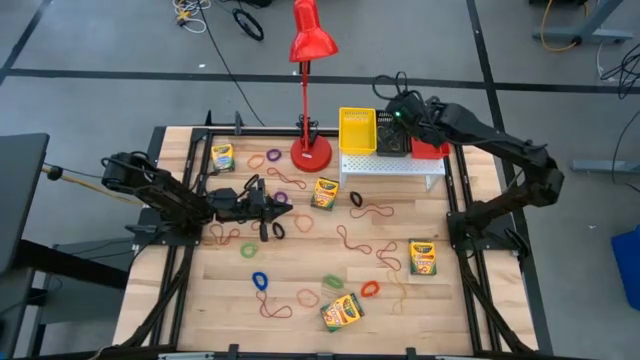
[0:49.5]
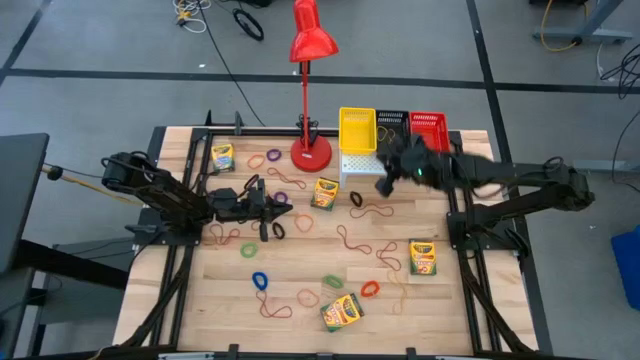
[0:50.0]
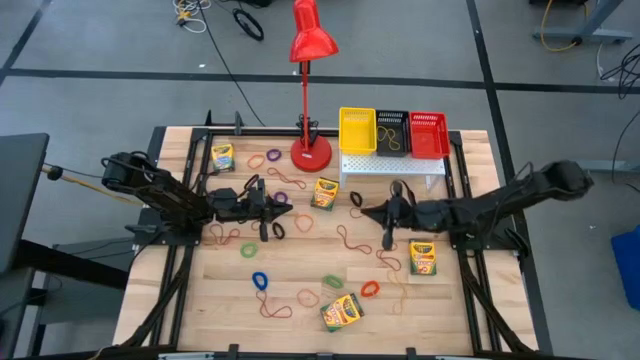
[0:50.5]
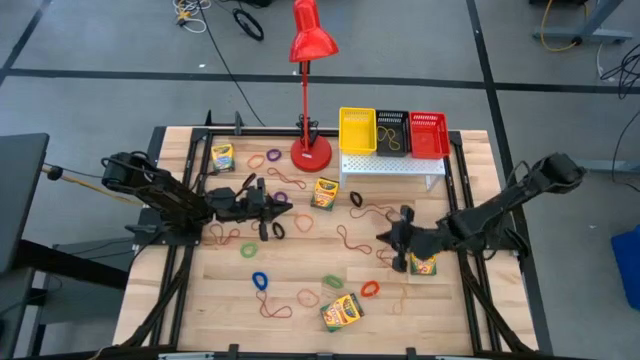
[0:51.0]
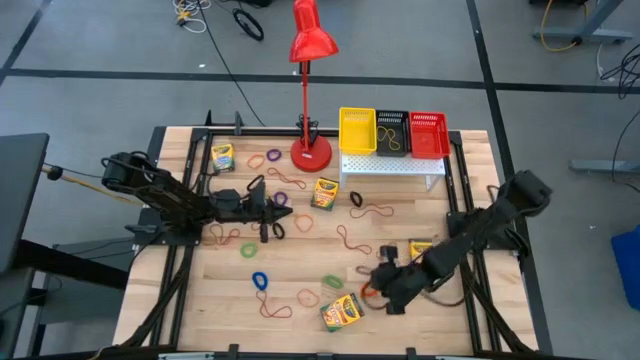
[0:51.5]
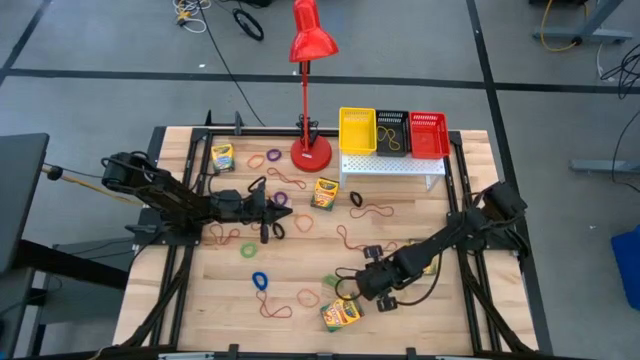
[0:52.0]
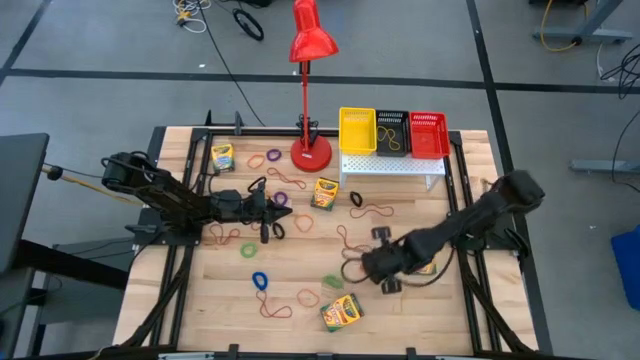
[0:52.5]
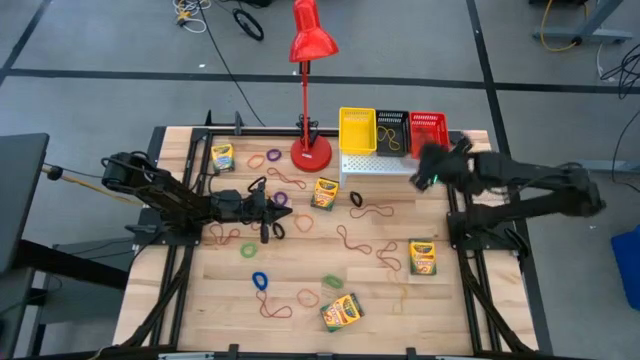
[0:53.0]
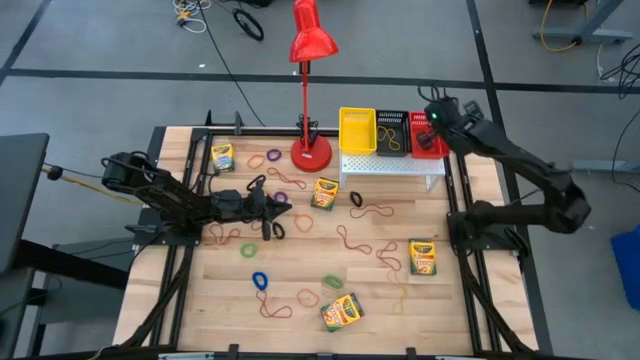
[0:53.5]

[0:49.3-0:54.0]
Task: Pick & Place Office Desk Supplies
Put the red spring keychain into the red bin on the shelf

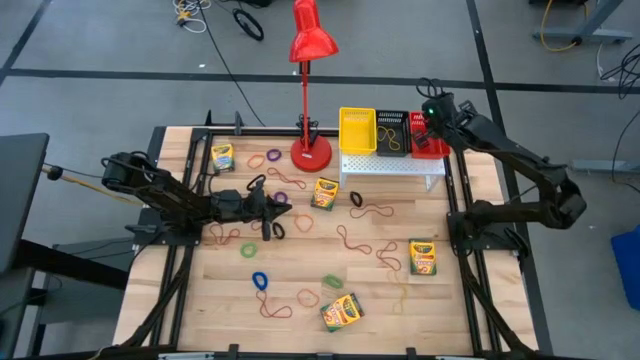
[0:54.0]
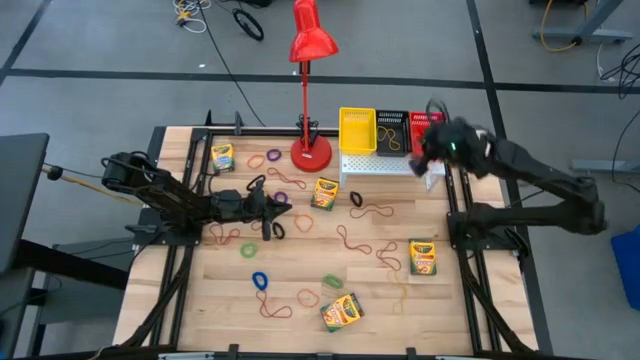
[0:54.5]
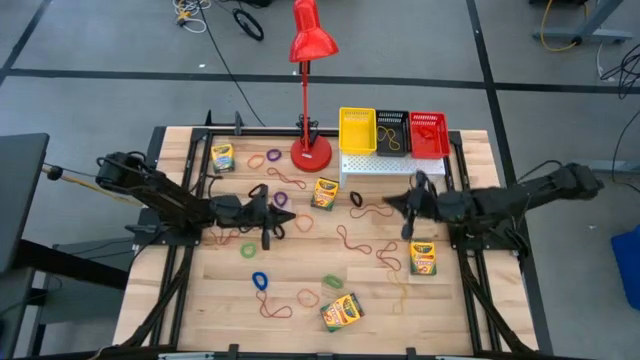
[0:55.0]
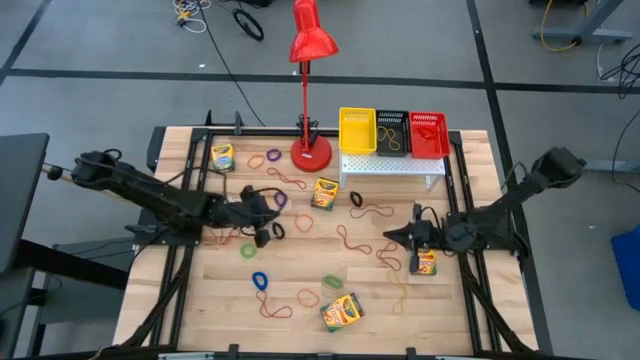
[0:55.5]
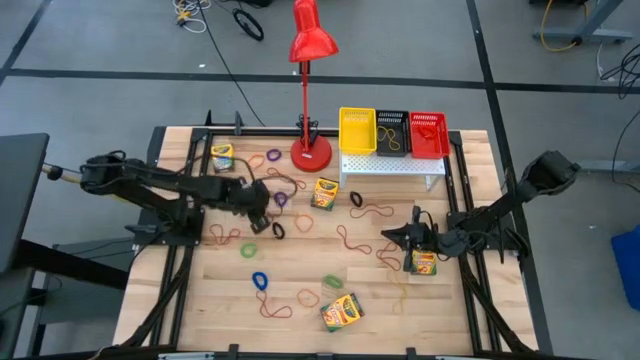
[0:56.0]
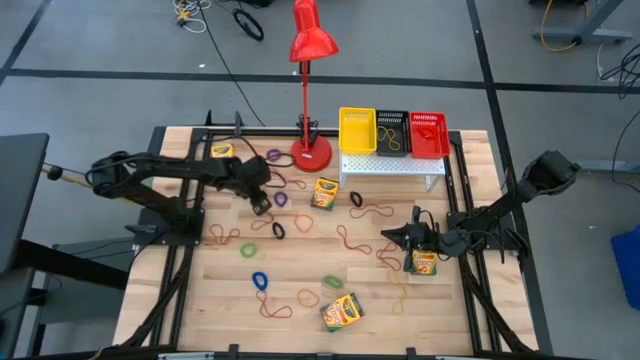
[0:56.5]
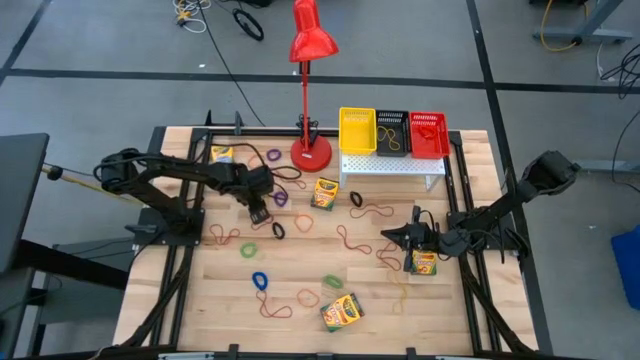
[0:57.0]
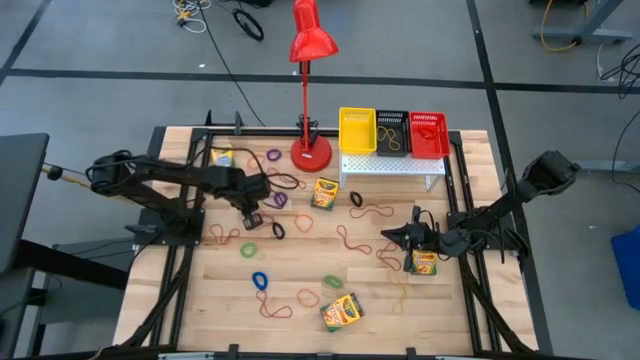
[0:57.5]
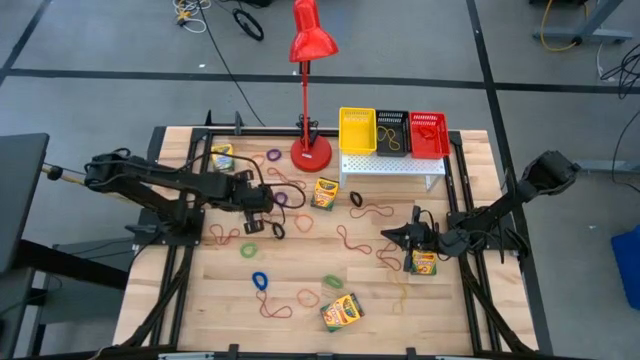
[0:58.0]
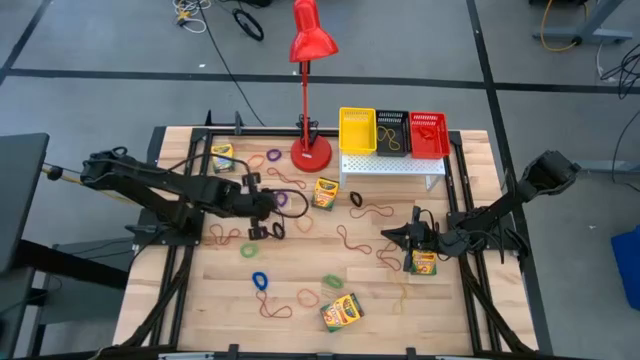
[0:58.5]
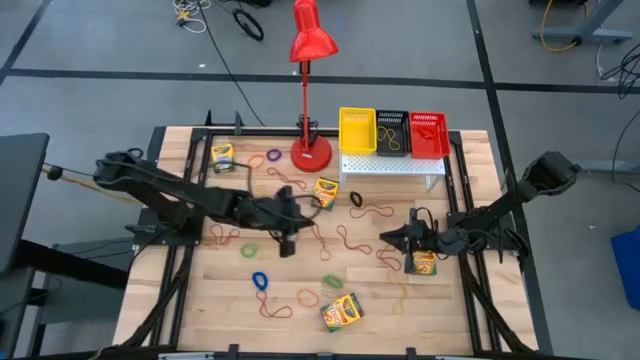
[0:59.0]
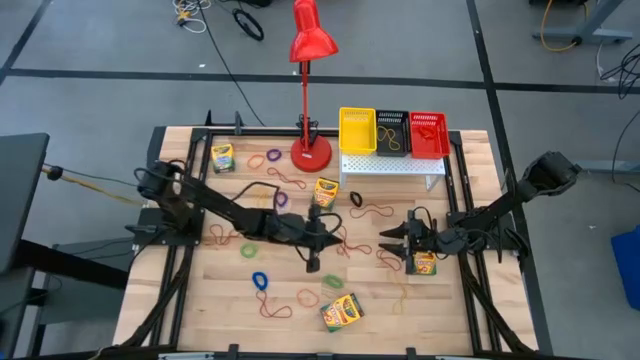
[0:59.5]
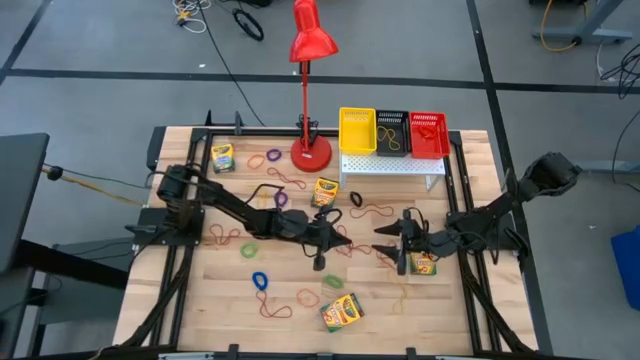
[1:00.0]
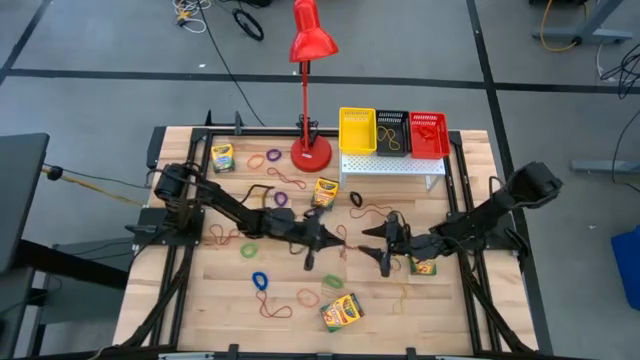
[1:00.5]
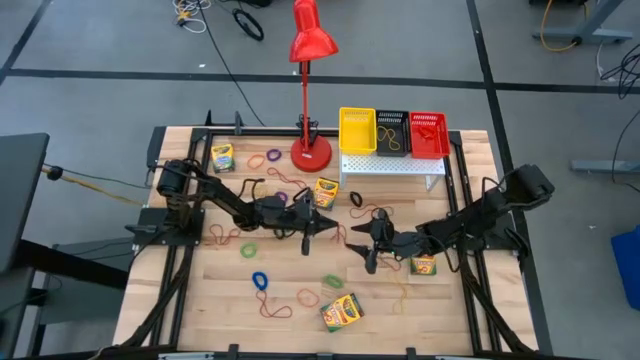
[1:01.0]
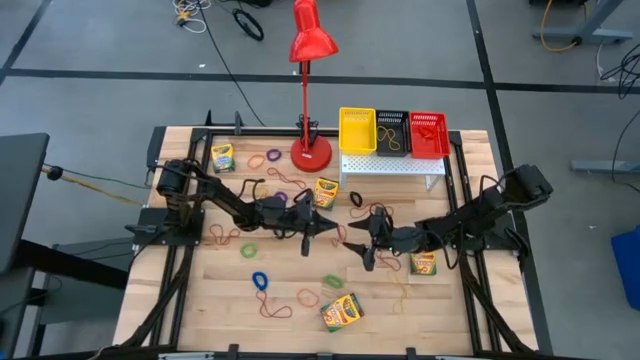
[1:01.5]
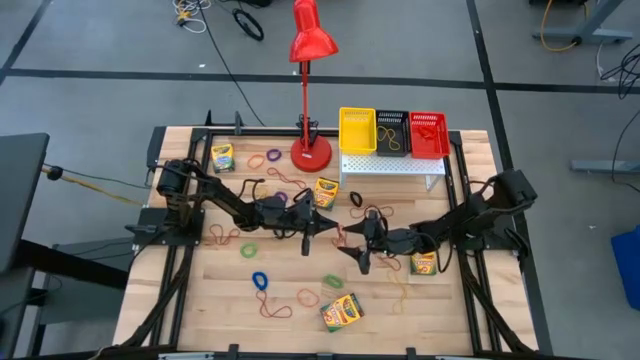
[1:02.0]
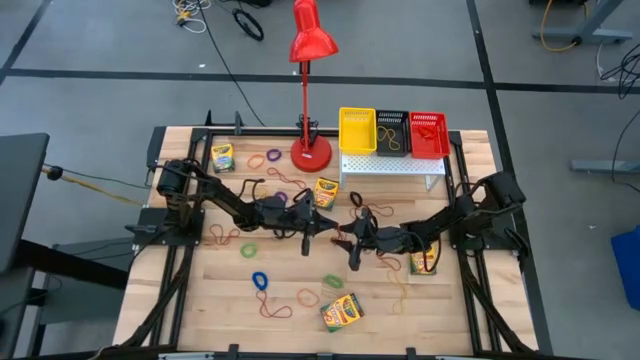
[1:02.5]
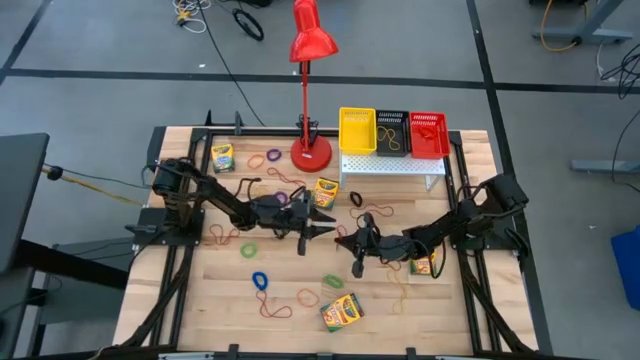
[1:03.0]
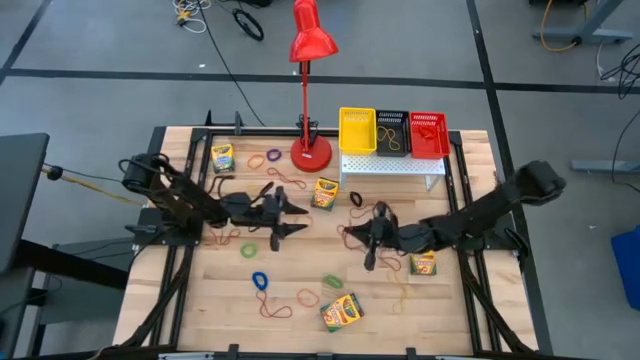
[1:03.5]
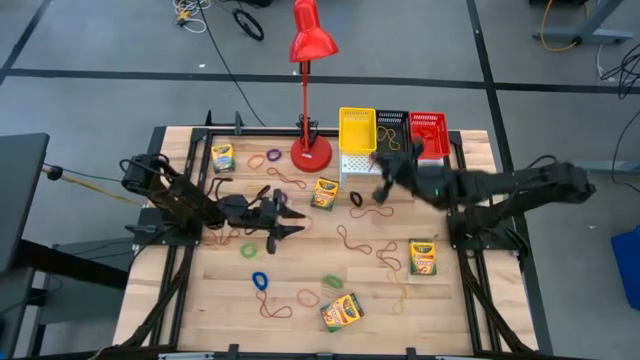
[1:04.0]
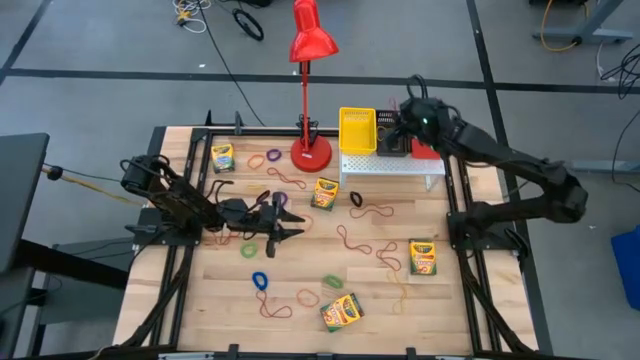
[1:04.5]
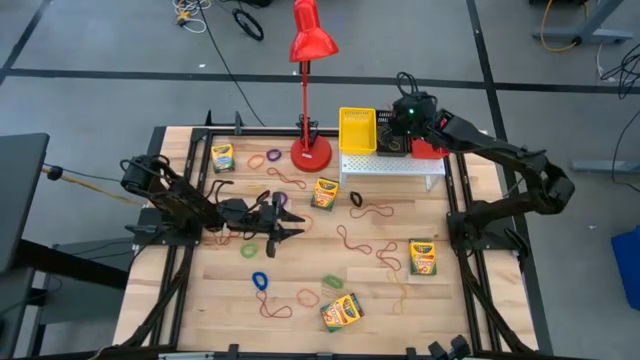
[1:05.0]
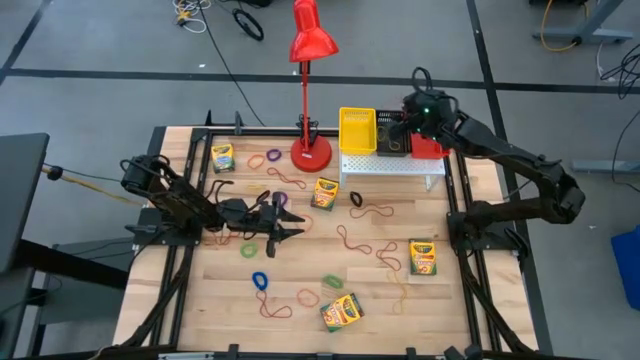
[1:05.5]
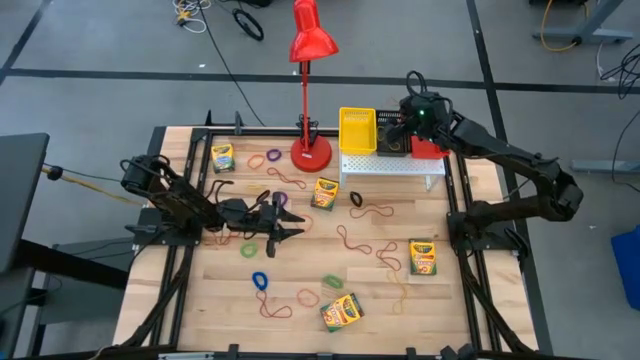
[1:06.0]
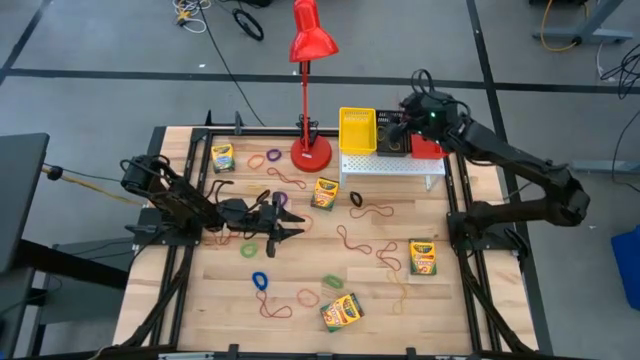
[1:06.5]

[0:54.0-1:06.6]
Put the red rubber band into the black bin on the shelf

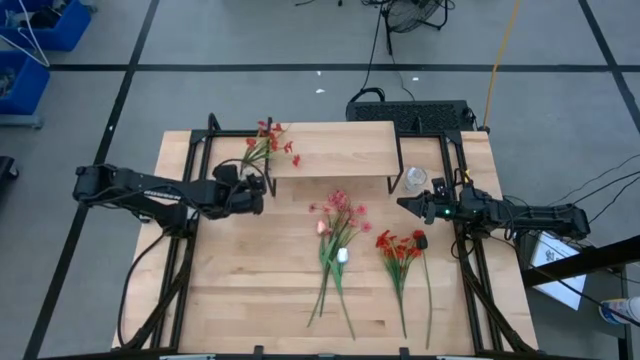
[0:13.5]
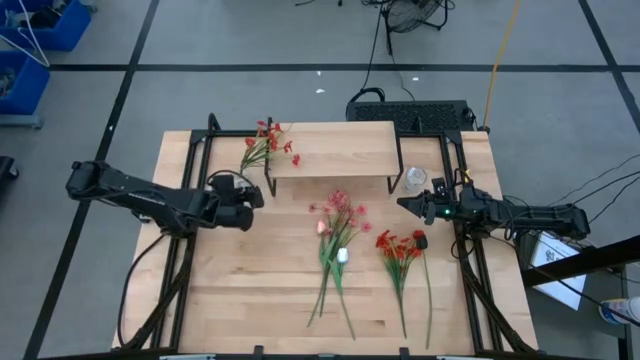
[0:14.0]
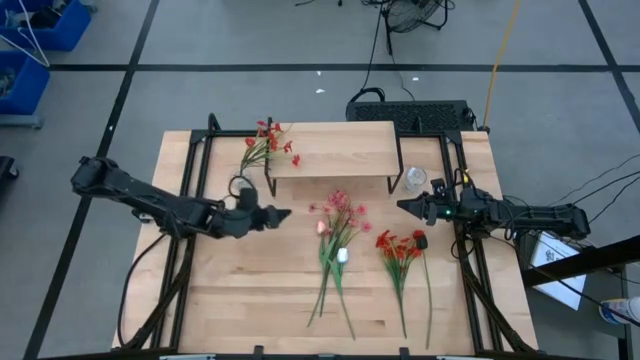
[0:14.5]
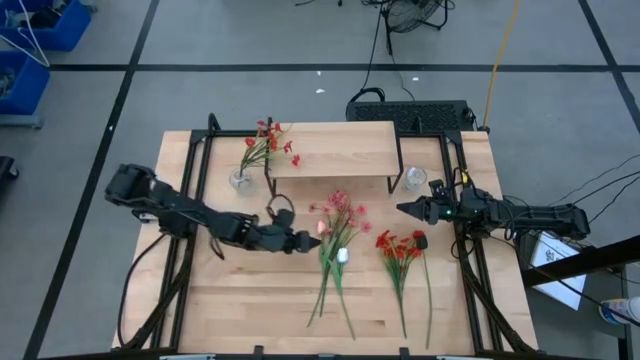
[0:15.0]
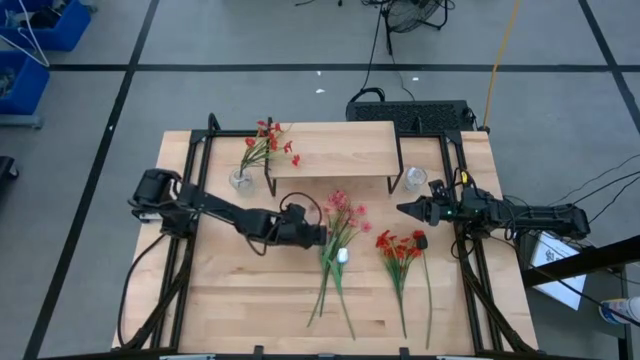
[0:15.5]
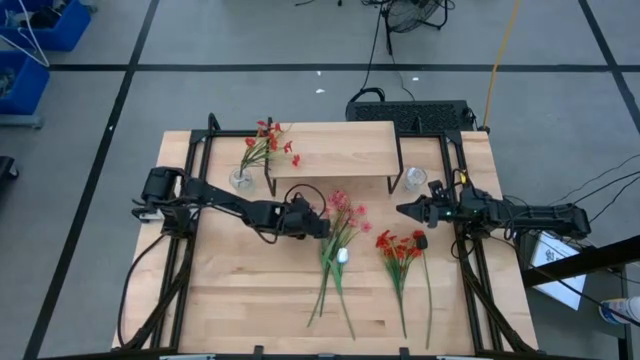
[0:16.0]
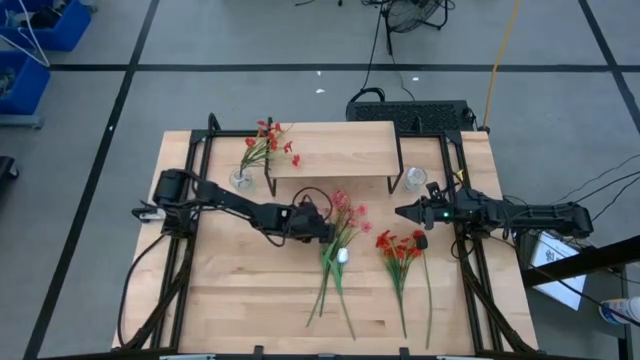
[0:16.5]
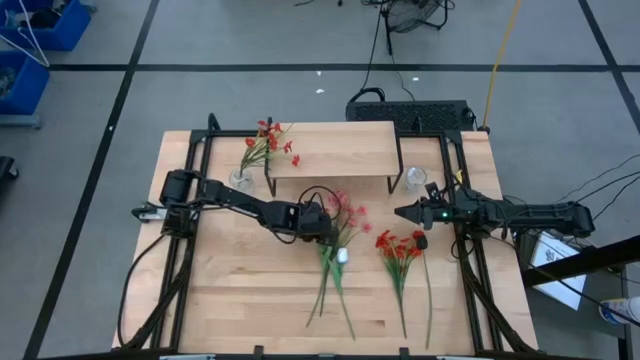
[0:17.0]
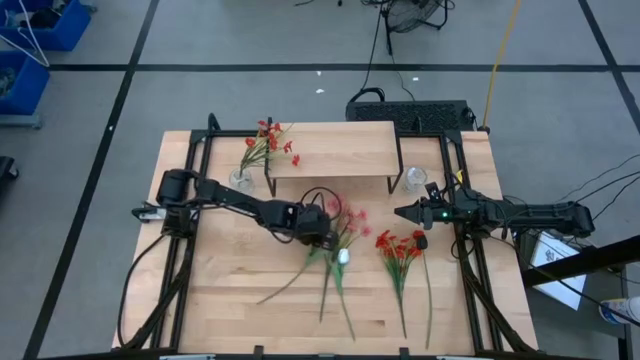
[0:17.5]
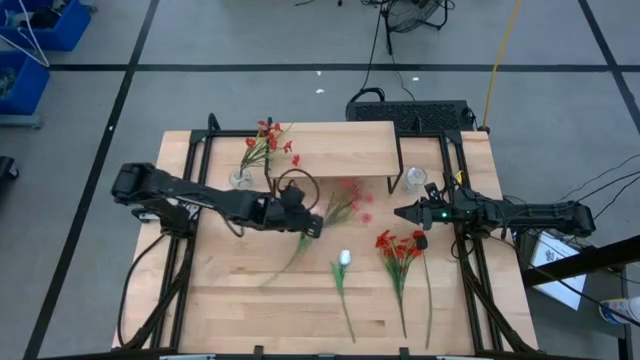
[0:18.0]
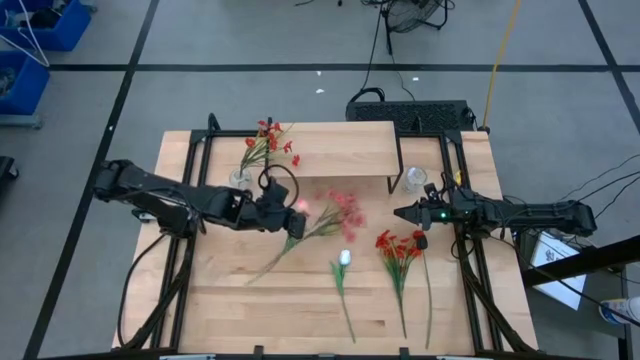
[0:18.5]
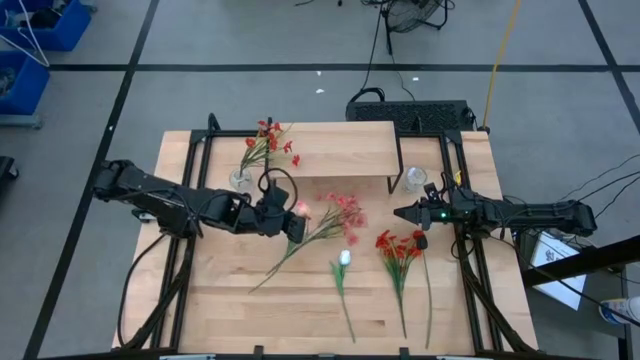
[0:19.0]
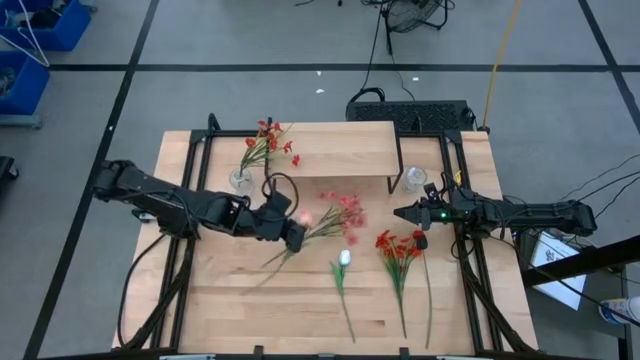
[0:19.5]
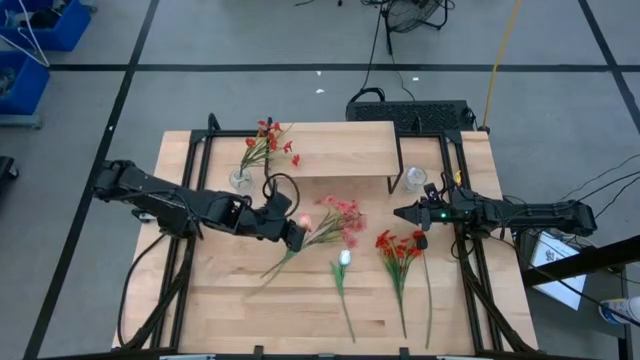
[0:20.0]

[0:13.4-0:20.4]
Task: Pick and place flowers into a vace then onto a shelf
Put the pink flower into the left transparent vase
